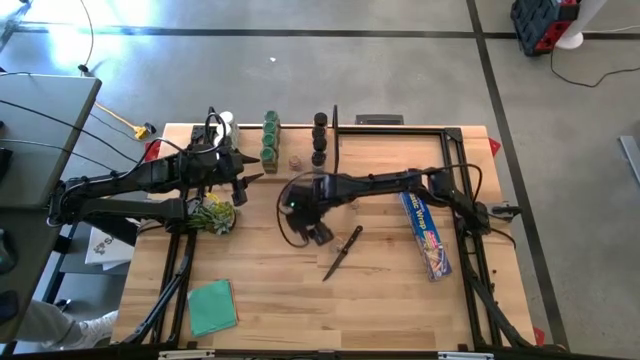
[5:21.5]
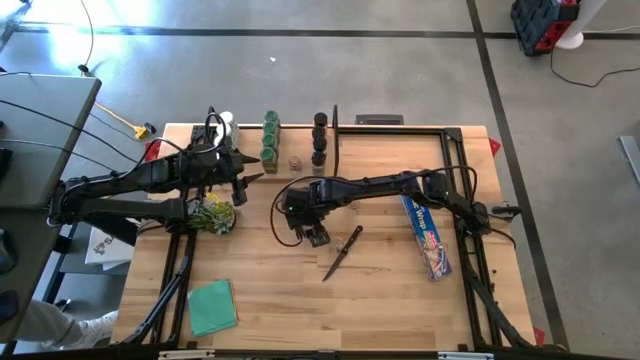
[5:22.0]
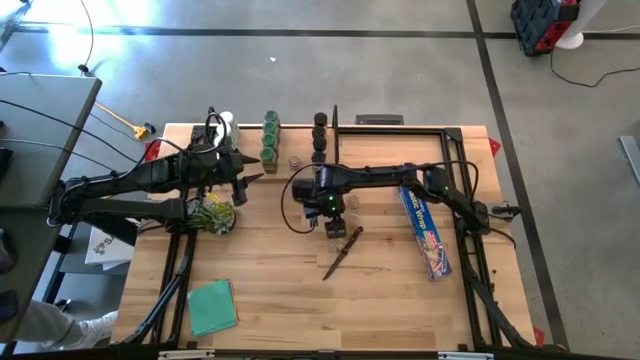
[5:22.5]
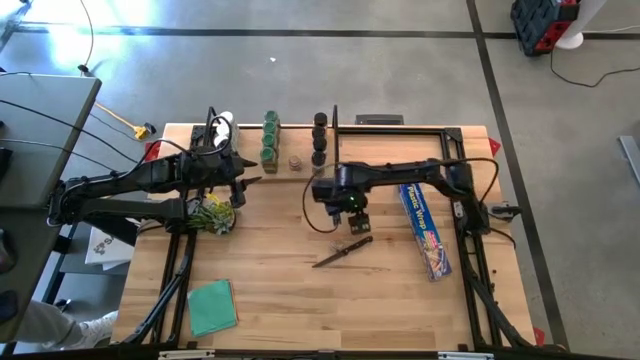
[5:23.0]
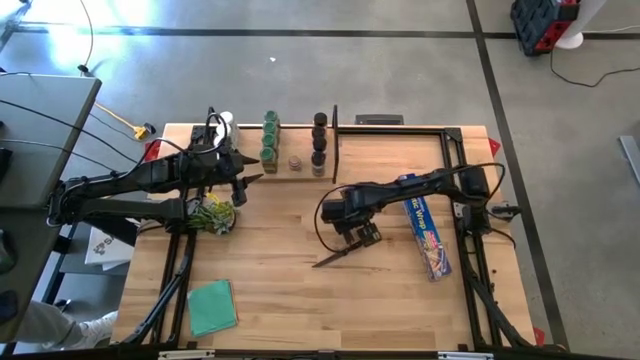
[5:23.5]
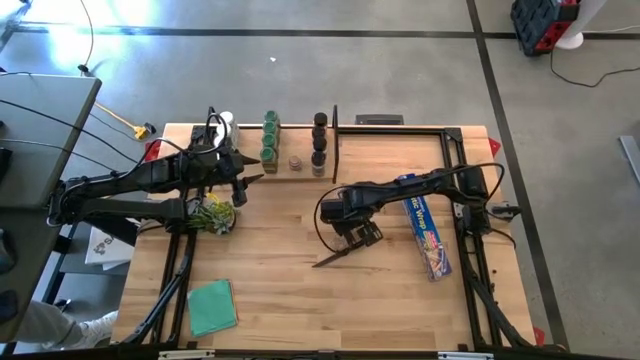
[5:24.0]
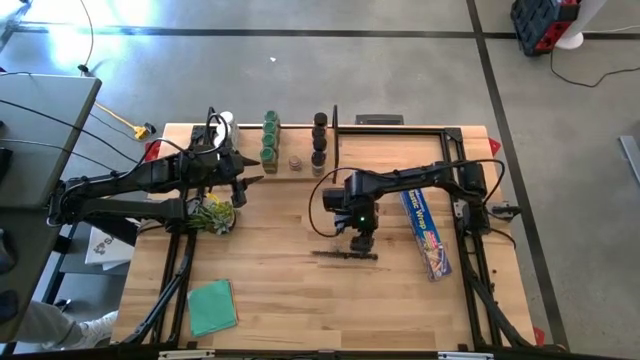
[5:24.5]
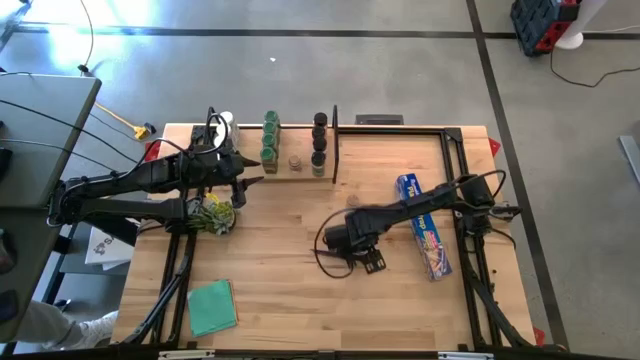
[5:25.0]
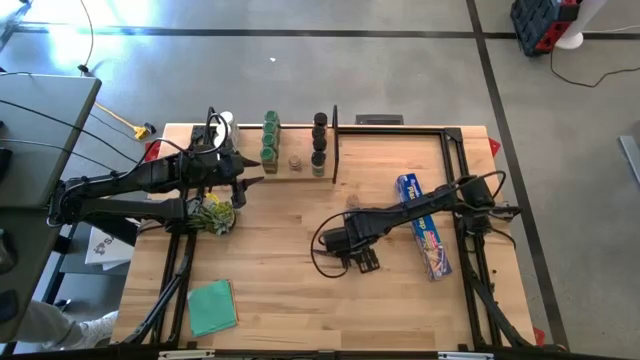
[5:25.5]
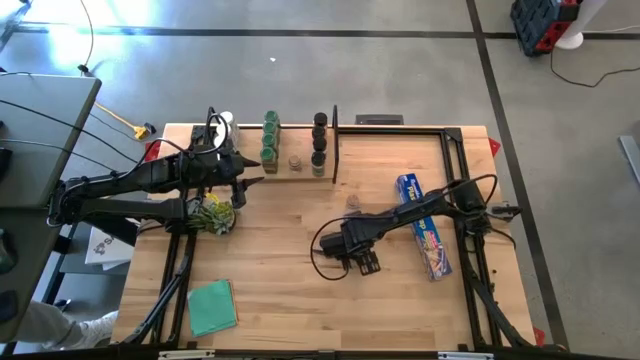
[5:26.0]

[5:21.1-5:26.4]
Task: Shelf spices
Put the brown lid seasoning bottle on the shelf

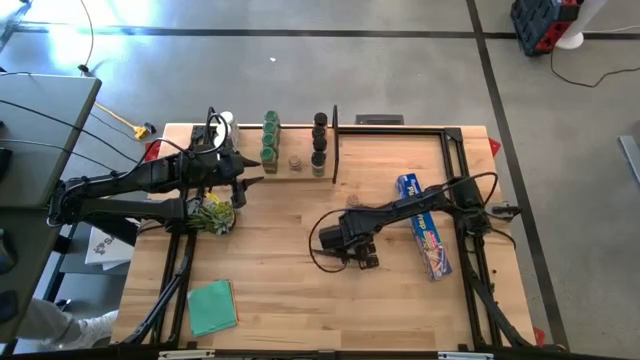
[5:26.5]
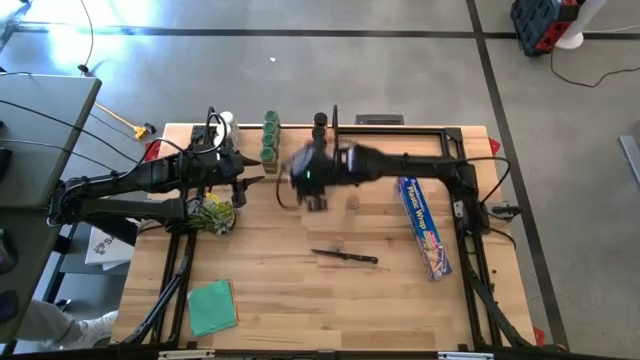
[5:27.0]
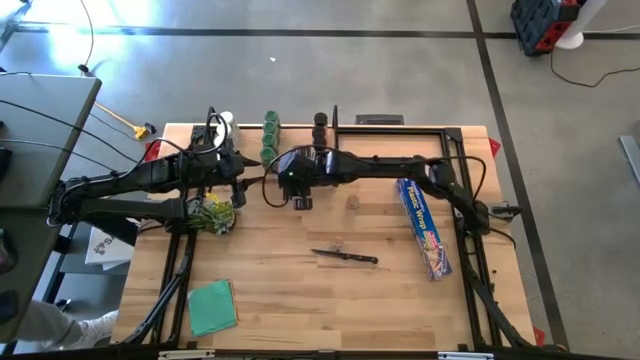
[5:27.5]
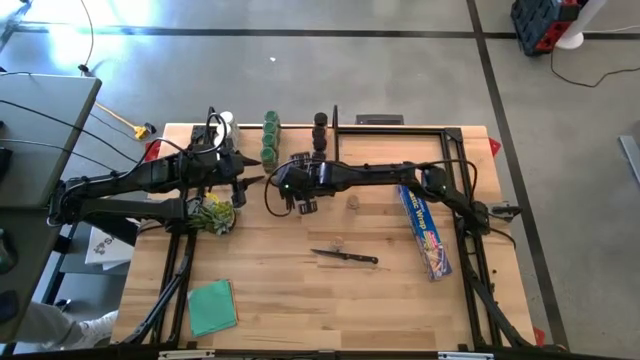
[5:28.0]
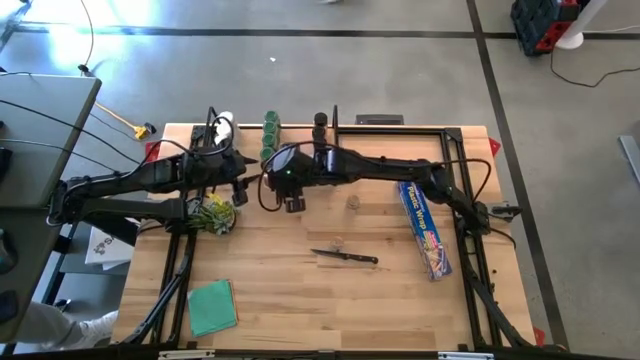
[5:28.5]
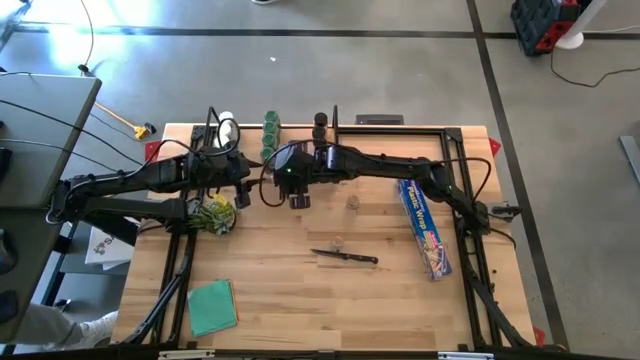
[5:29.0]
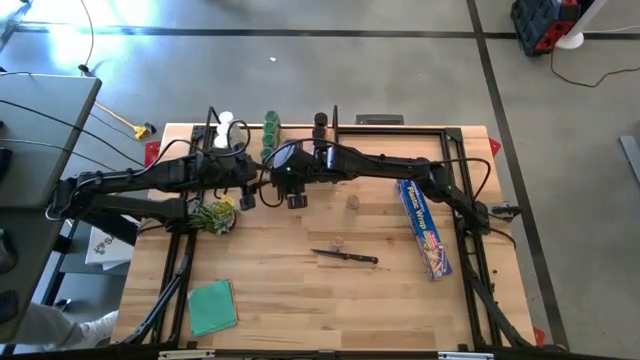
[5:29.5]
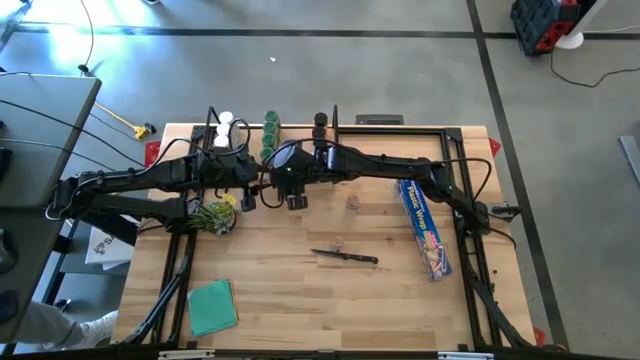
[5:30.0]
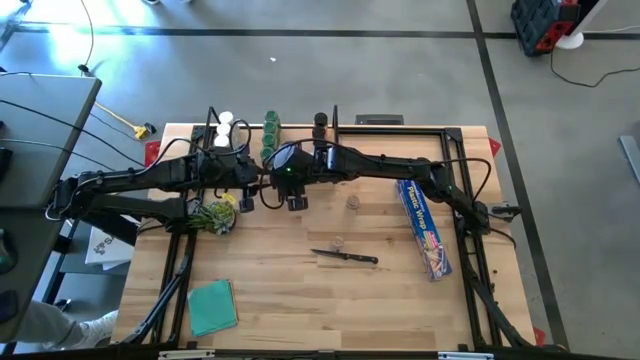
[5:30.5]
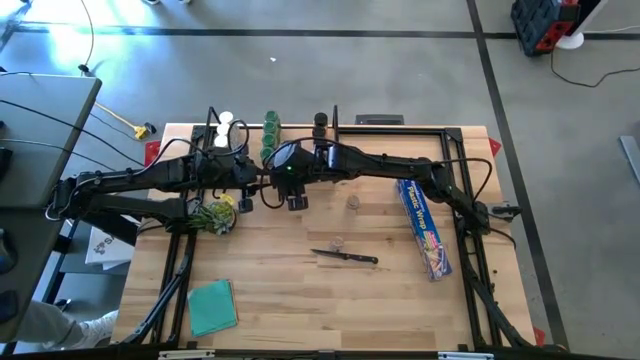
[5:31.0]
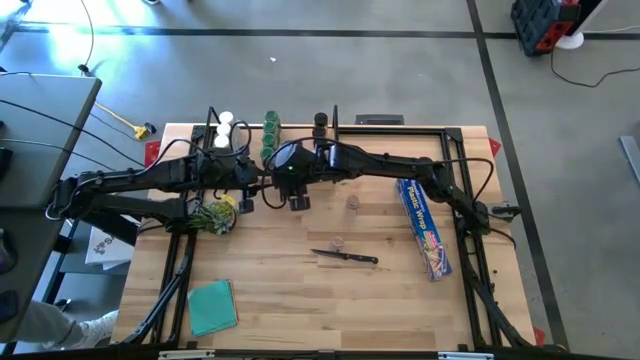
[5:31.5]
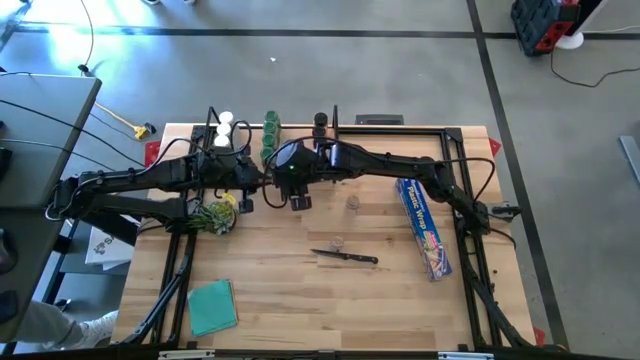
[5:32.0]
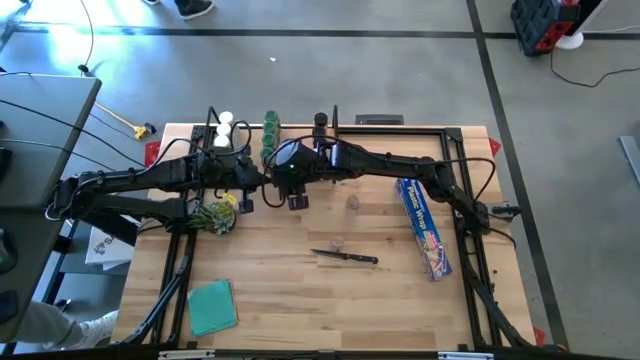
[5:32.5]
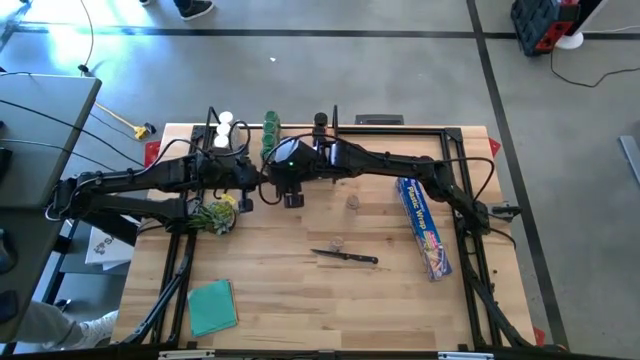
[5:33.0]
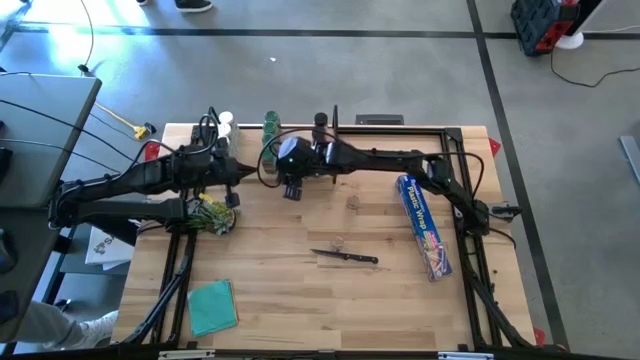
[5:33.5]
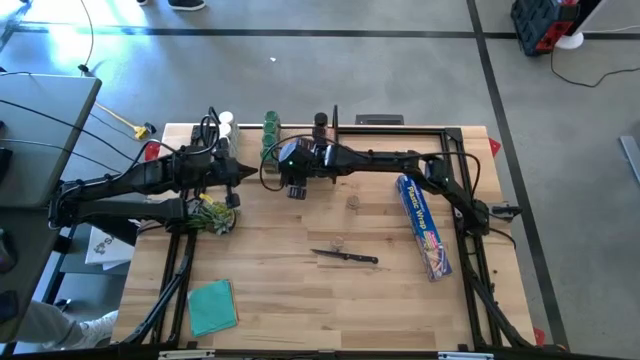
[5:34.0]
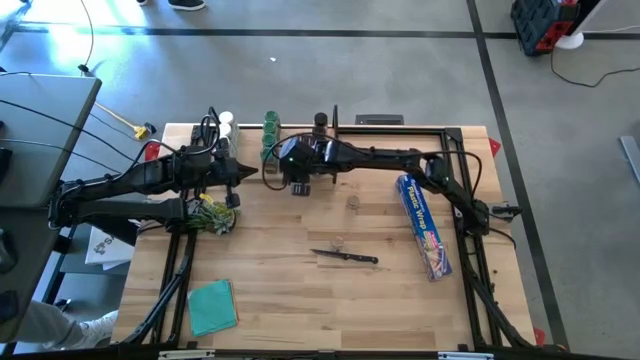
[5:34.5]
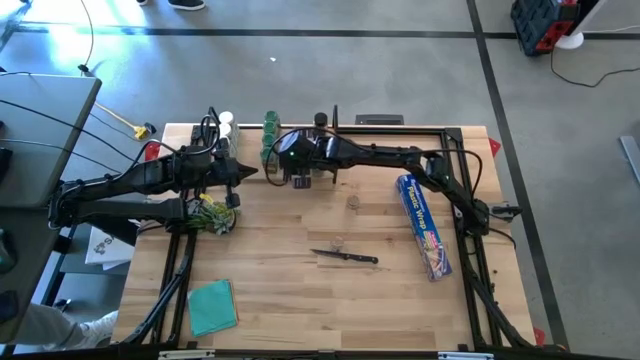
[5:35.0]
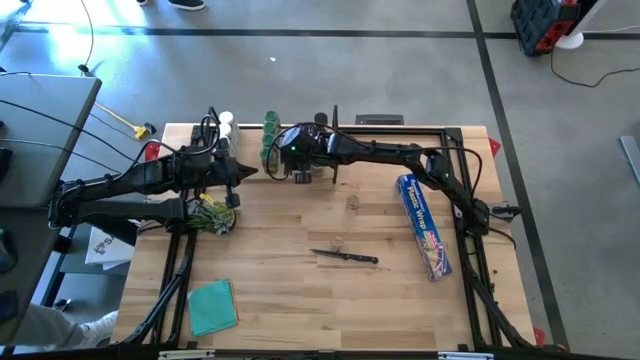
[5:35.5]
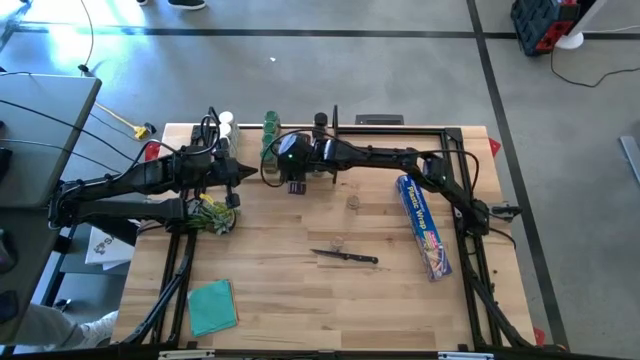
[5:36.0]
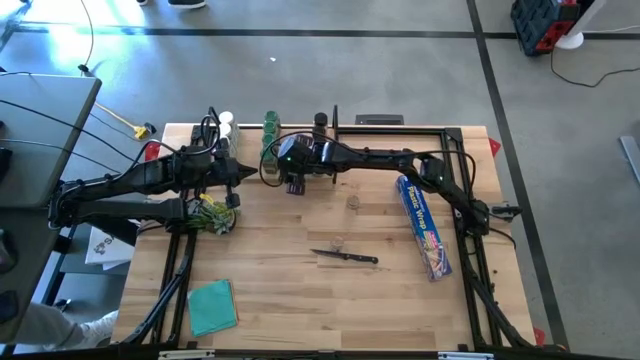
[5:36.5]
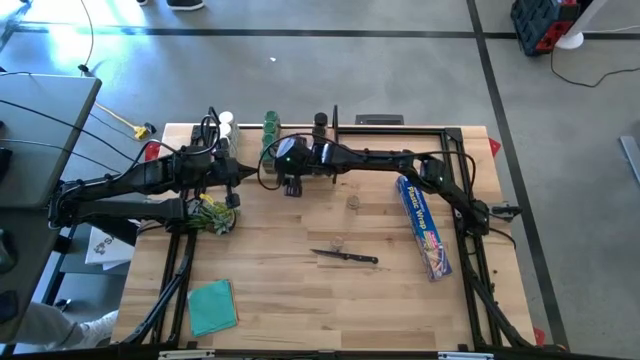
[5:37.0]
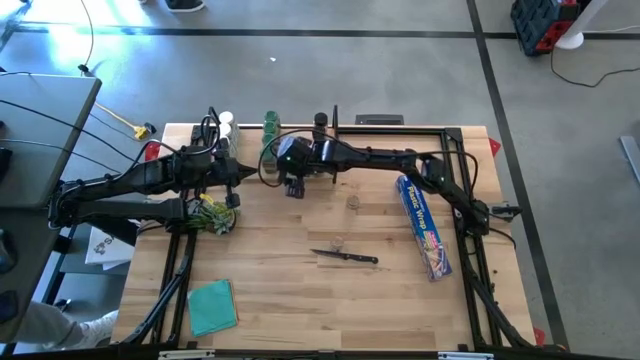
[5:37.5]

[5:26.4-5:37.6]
Put the brown lid seasoning bottle on the shelf
